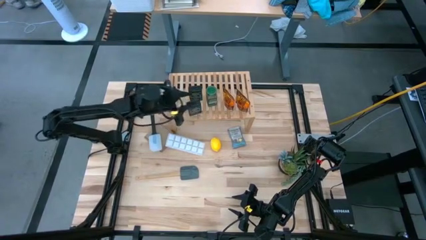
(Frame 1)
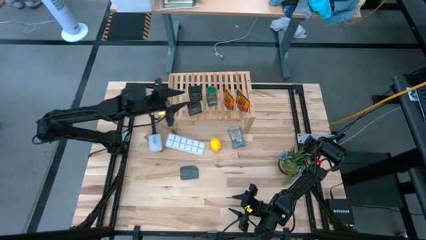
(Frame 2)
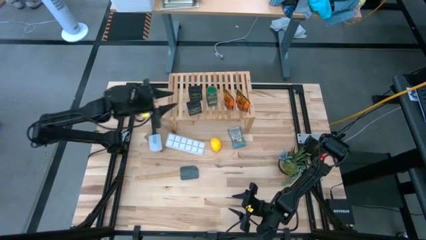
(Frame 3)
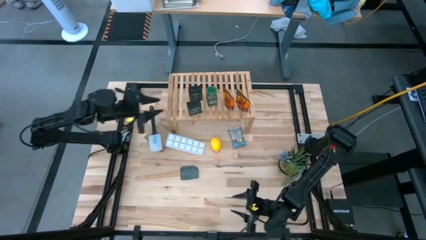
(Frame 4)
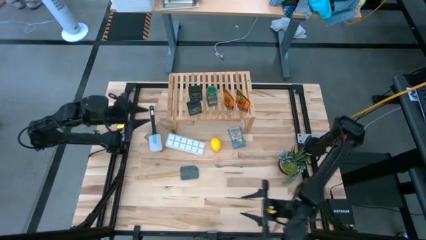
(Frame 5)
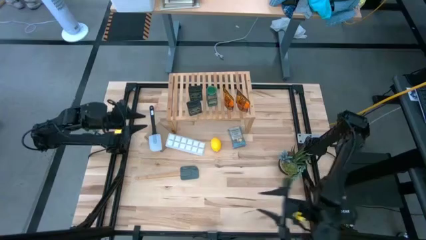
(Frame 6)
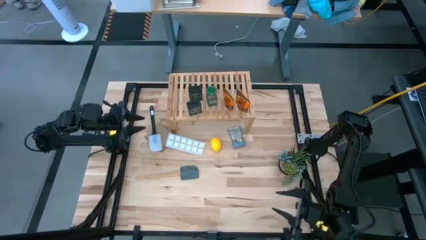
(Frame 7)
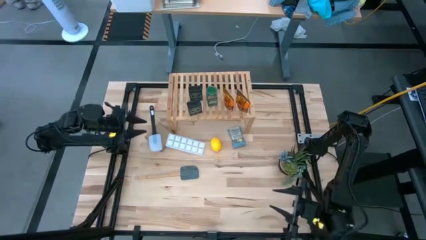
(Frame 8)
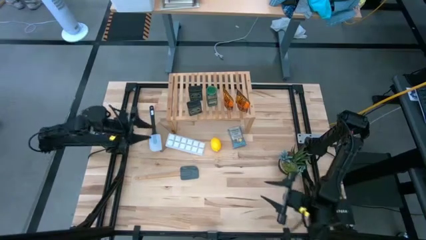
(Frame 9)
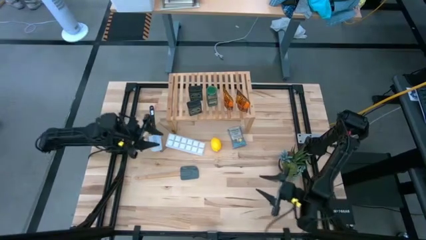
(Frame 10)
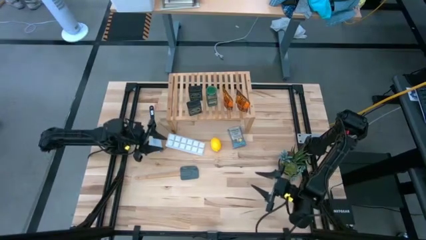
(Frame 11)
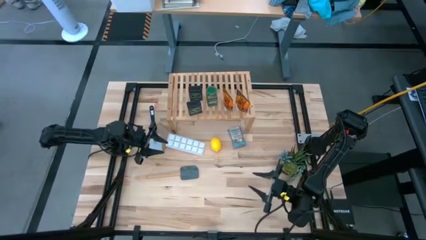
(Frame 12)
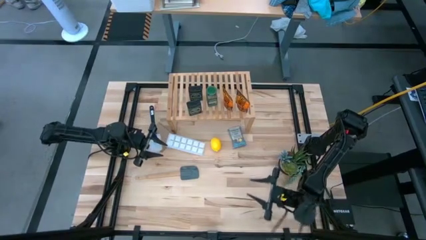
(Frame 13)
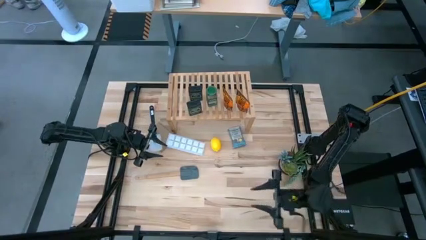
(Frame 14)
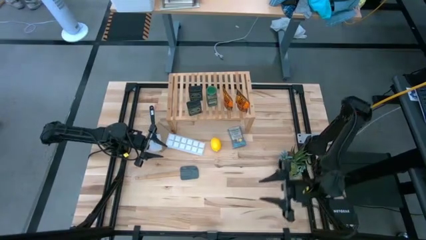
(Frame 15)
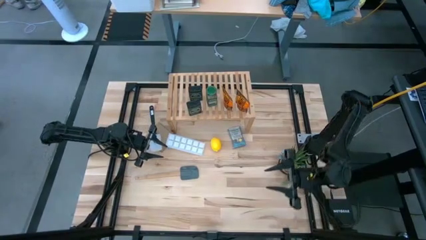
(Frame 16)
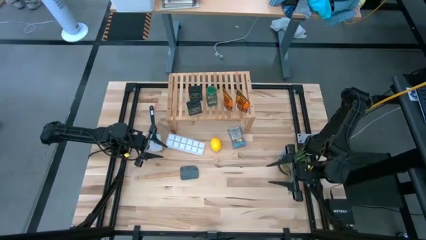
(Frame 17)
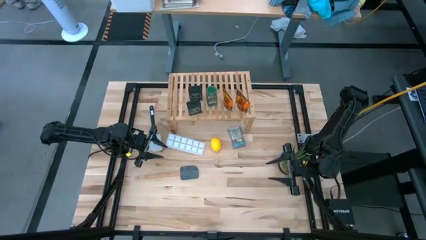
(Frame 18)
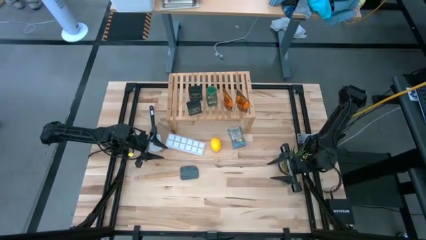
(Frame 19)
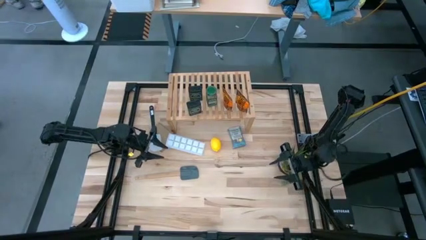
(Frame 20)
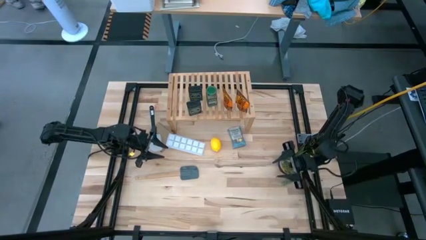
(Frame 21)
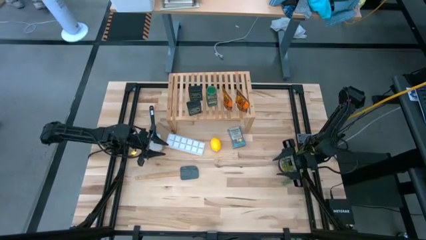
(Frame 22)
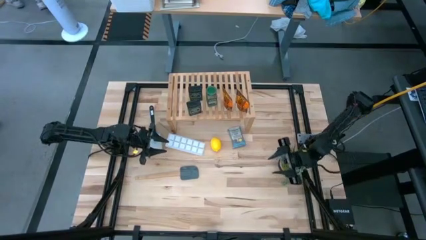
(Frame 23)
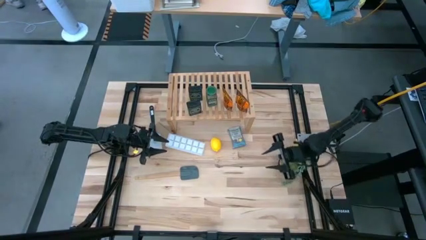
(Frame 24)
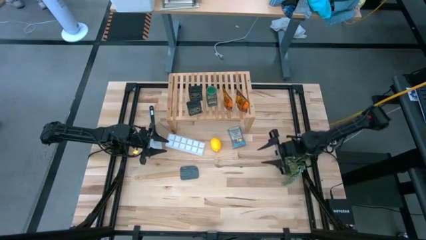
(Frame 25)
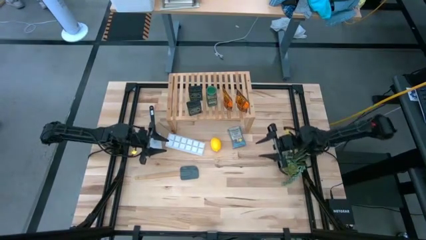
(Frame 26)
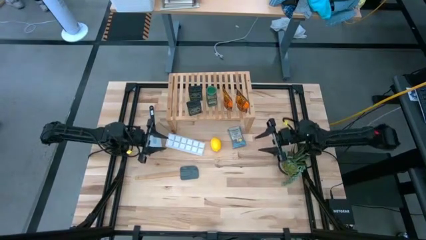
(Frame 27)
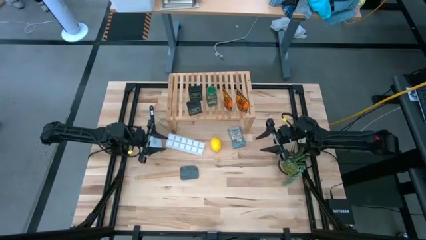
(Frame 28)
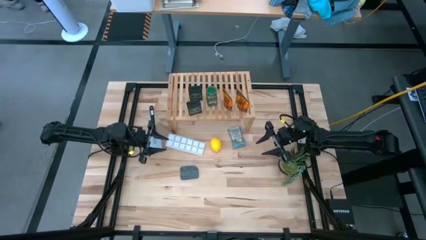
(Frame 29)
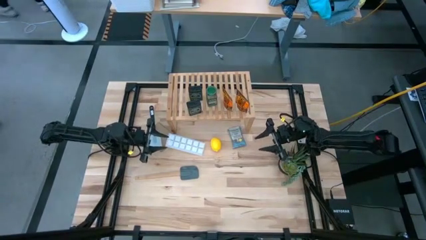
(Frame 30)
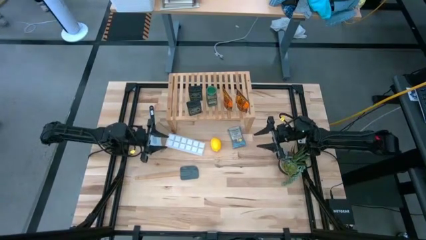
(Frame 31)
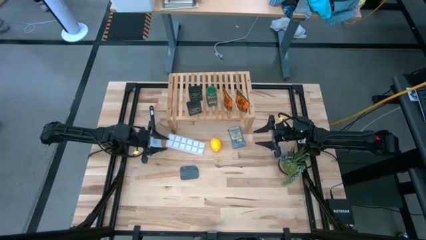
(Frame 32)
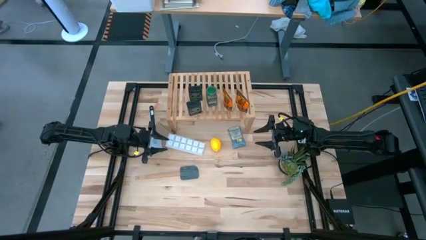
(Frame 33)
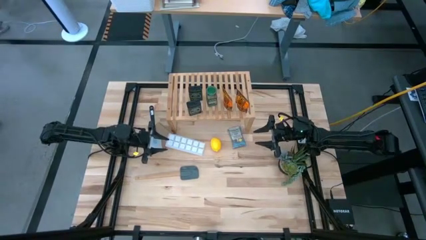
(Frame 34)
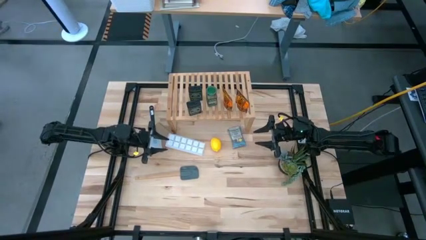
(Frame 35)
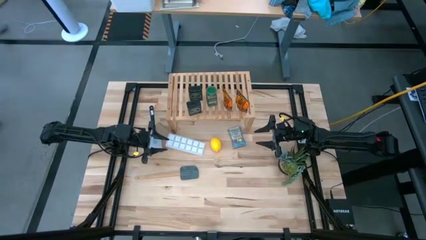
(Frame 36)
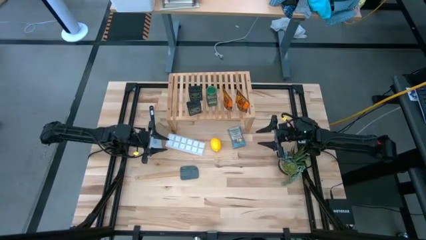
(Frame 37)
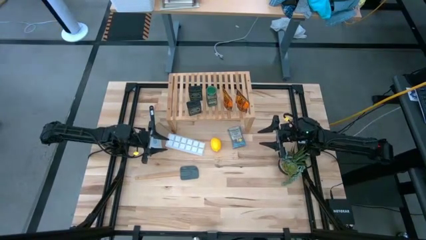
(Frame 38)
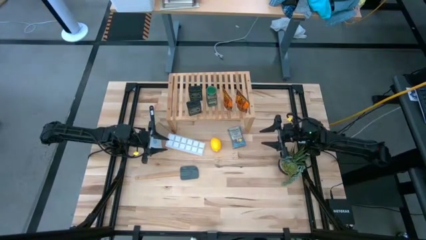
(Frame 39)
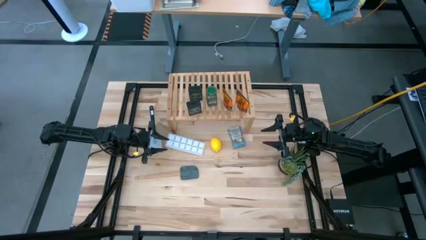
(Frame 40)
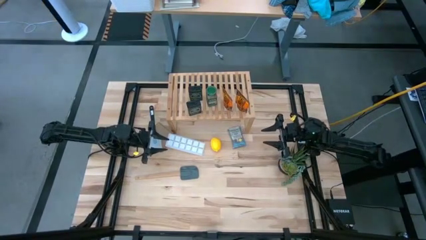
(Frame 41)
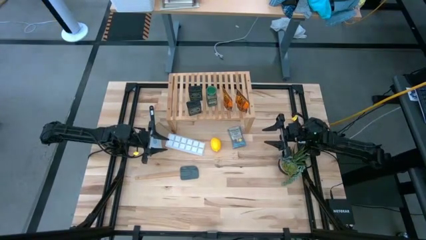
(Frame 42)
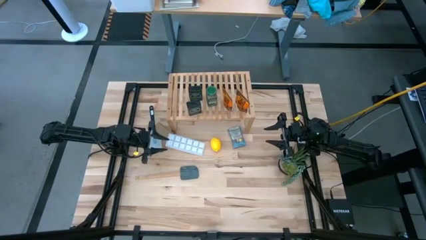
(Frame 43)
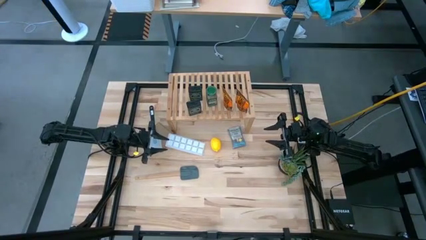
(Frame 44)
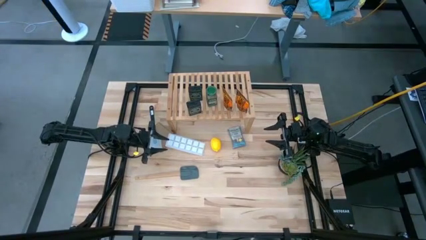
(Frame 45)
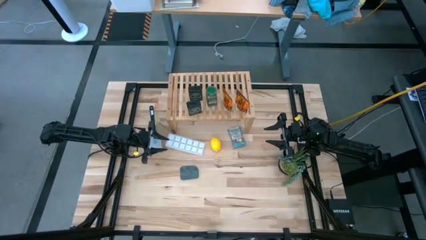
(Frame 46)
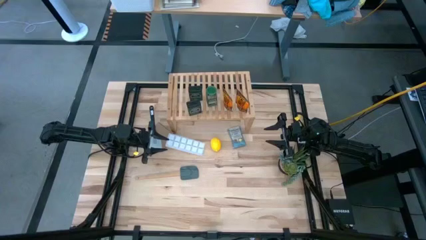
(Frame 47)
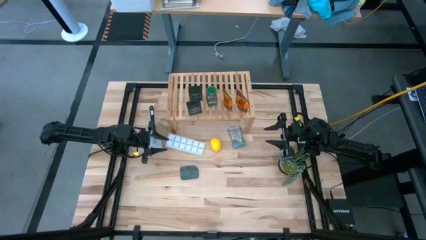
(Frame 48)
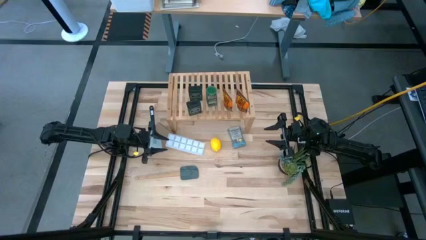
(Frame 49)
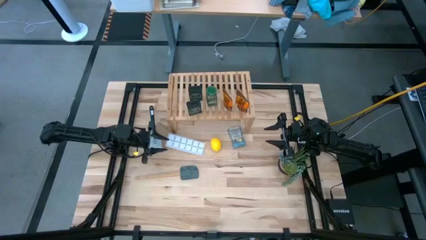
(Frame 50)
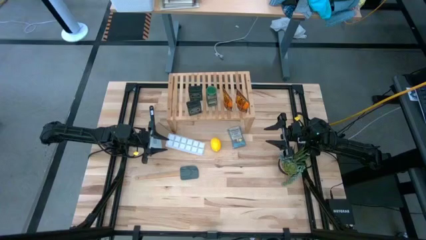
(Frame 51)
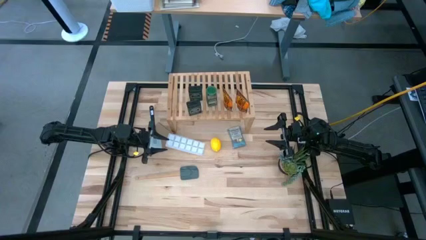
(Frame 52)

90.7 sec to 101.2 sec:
Task: Shelf spices
Return to Home Position

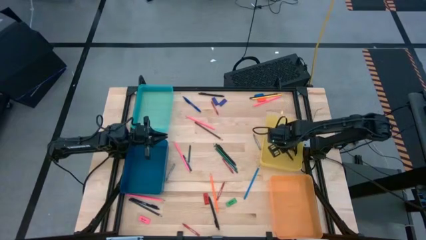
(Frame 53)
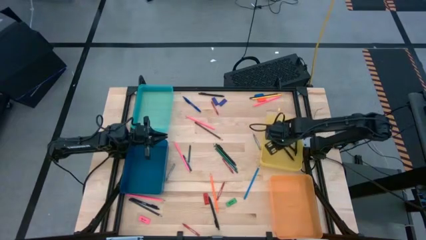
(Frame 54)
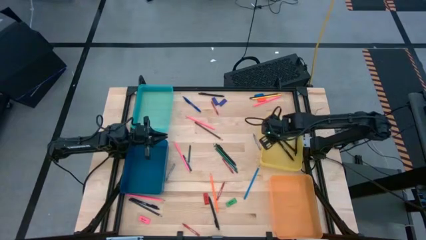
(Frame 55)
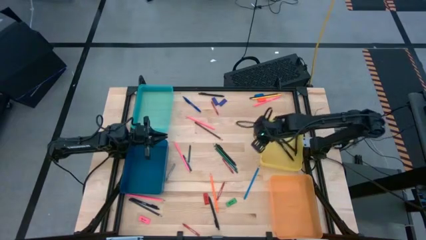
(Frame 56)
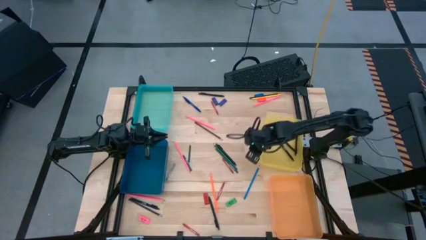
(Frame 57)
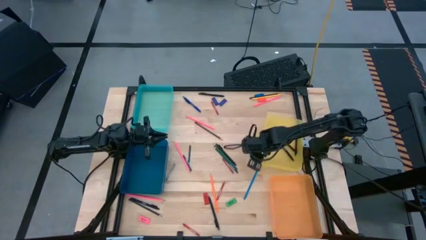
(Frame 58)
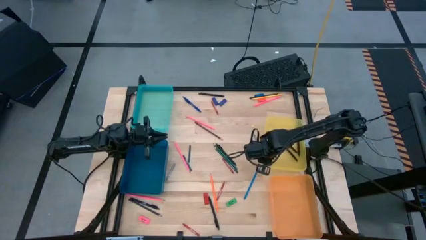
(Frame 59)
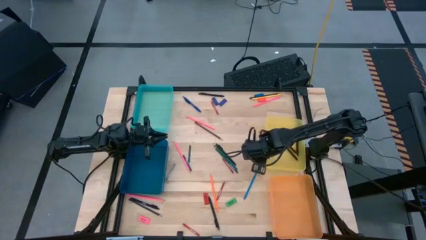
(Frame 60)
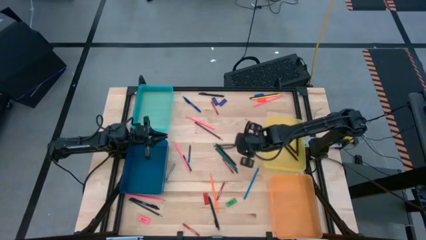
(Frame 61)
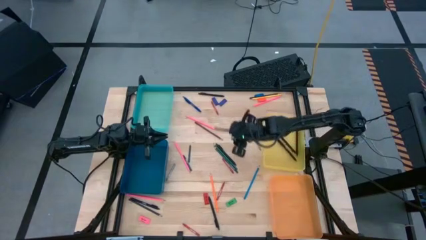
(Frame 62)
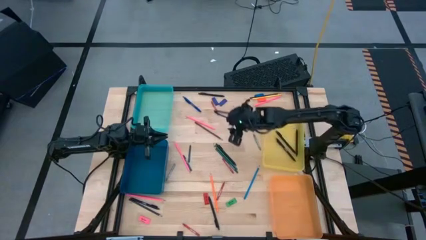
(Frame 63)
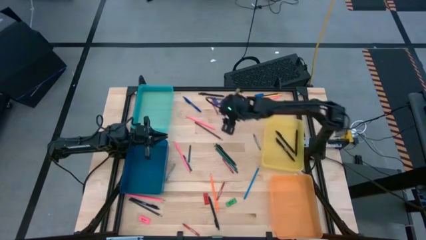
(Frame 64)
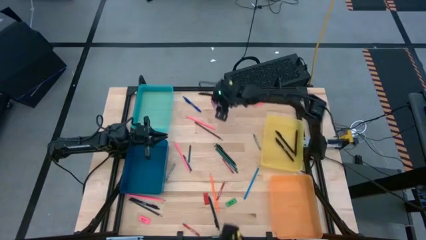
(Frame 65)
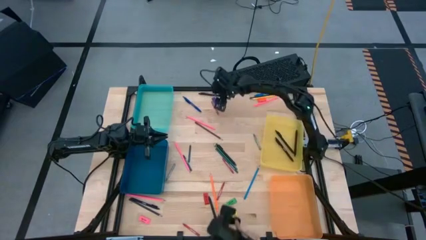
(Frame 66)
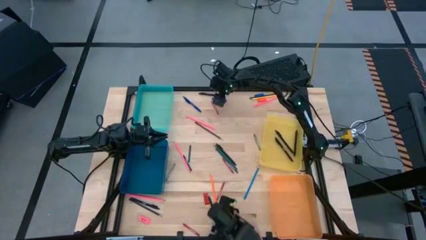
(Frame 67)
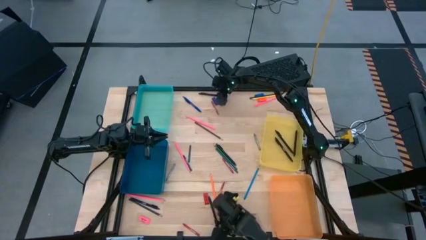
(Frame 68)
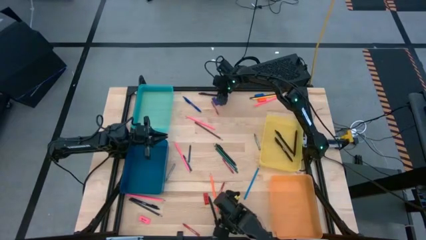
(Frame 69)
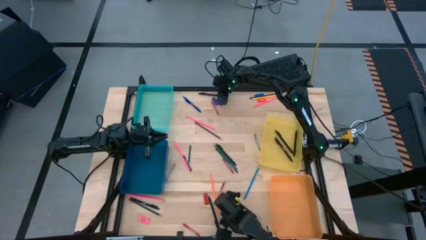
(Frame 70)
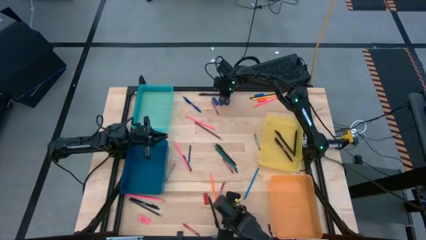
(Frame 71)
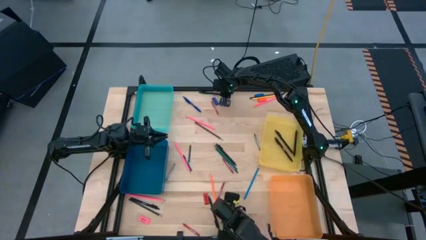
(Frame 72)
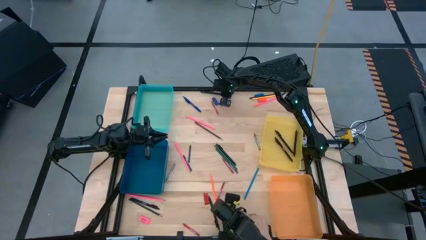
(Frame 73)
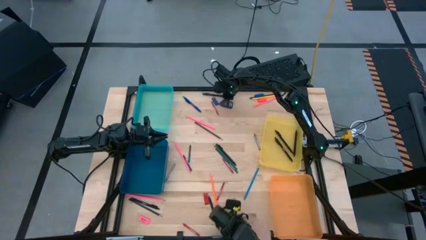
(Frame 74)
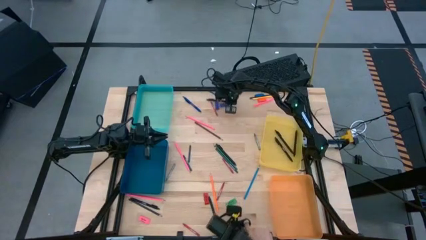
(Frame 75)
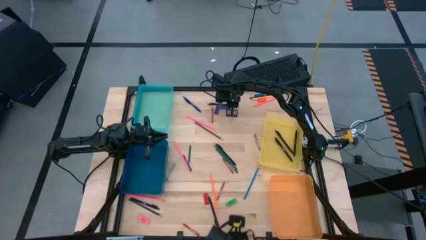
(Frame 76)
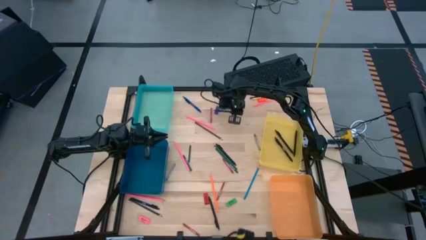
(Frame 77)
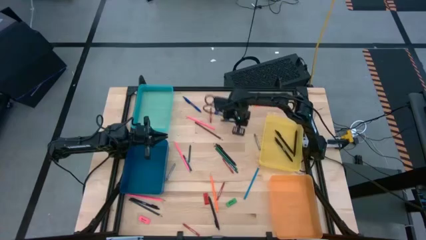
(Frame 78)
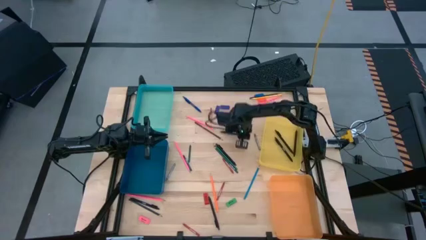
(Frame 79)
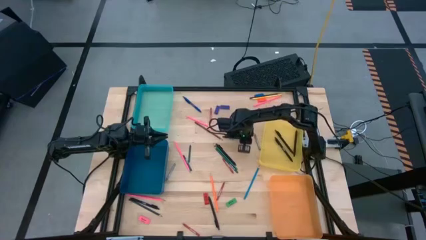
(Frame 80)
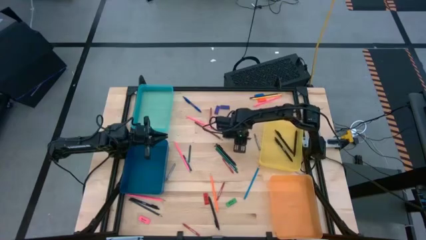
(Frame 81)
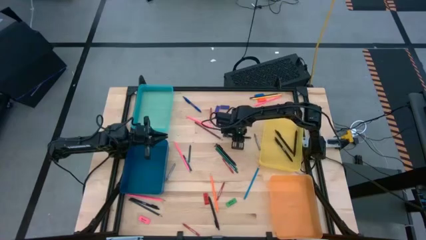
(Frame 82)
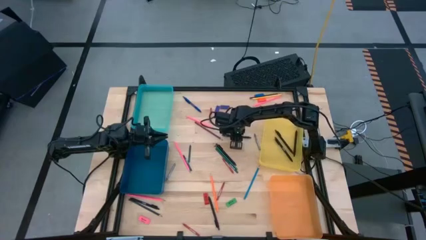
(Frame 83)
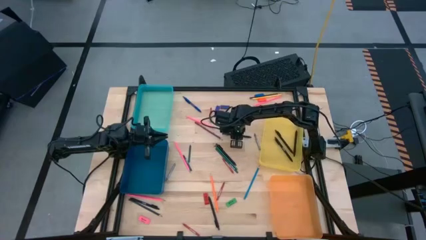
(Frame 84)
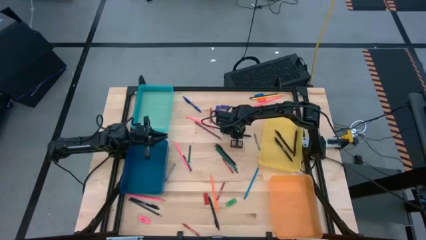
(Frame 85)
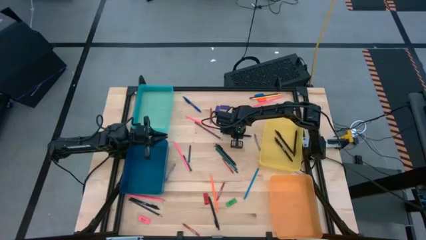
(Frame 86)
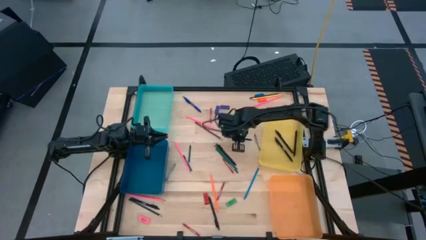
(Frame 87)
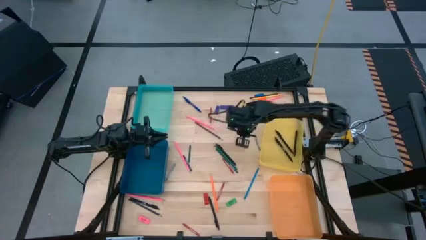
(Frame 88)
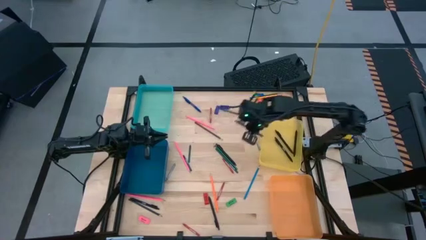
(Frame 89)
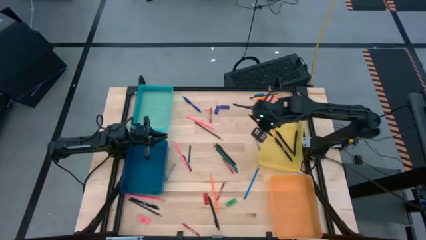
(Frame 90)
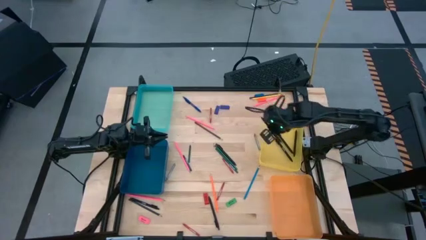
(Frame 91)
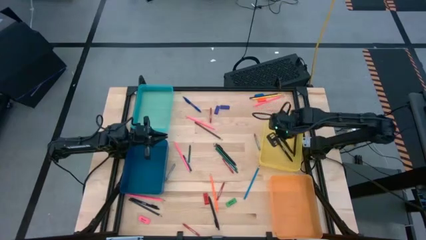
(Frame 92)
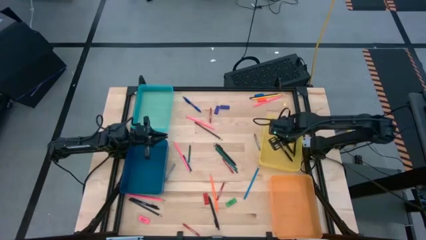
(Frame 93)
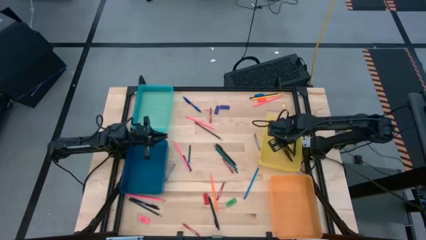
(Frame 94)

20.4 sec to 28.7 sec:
Task: Sort crayons/erasers/pens/pencils in bins
Put the black pen into the yellow bin
